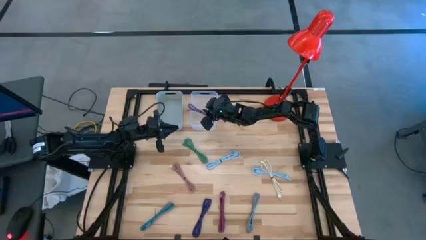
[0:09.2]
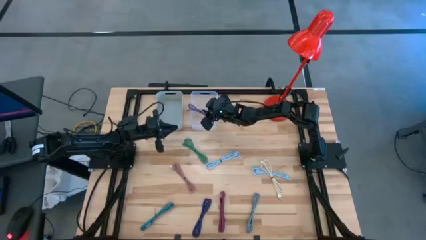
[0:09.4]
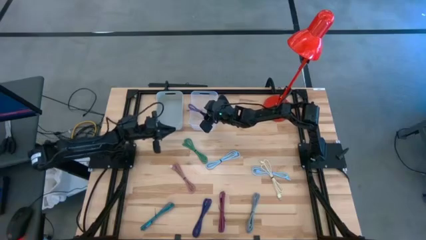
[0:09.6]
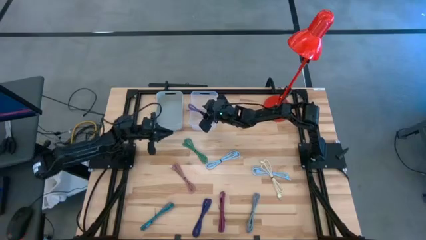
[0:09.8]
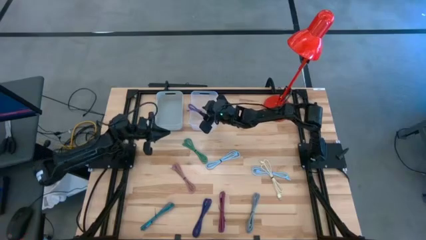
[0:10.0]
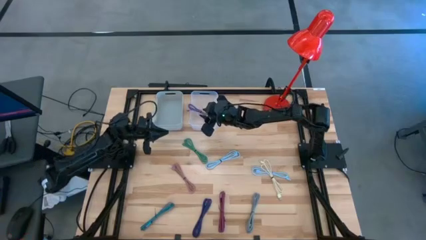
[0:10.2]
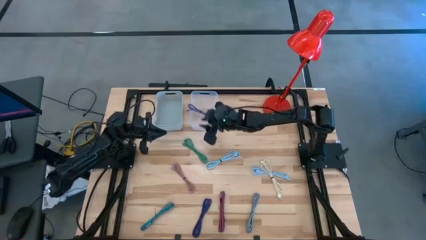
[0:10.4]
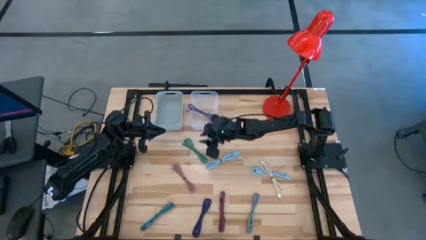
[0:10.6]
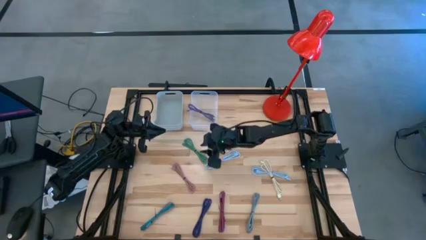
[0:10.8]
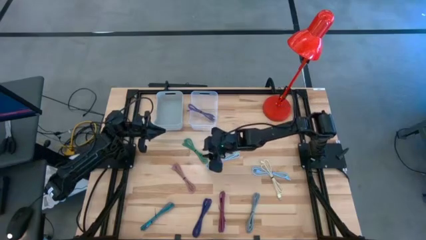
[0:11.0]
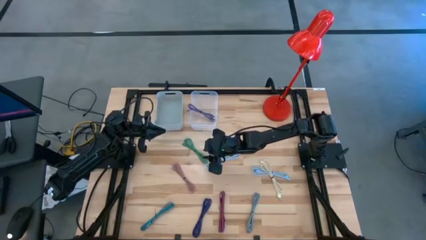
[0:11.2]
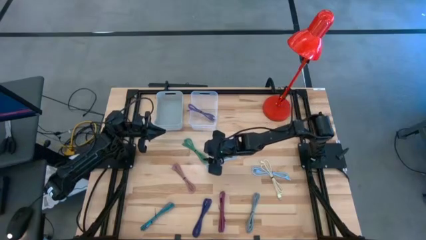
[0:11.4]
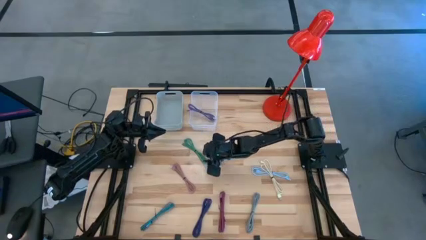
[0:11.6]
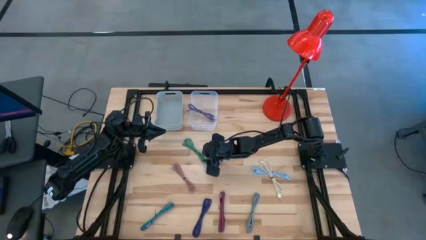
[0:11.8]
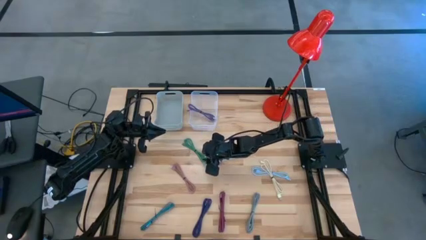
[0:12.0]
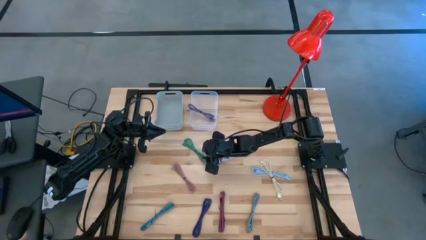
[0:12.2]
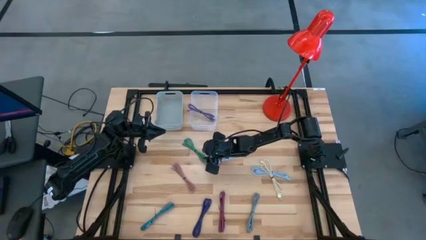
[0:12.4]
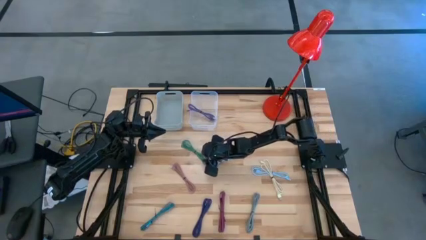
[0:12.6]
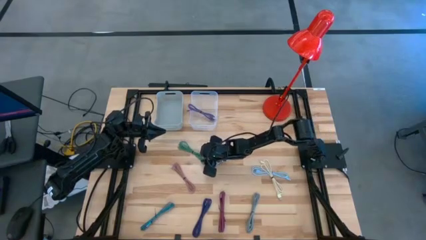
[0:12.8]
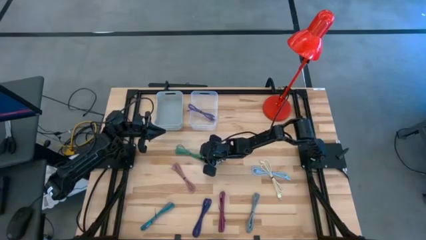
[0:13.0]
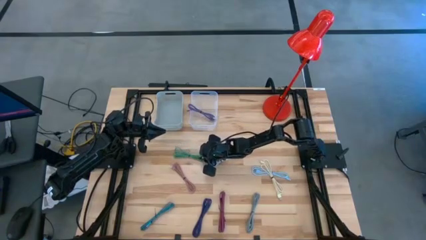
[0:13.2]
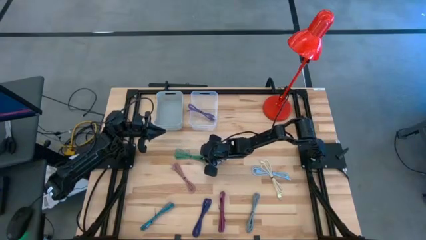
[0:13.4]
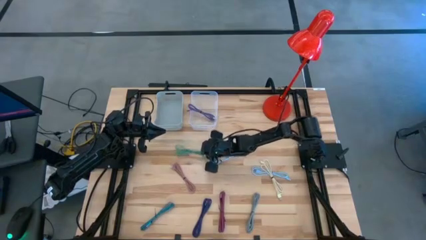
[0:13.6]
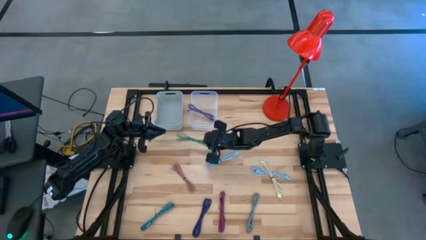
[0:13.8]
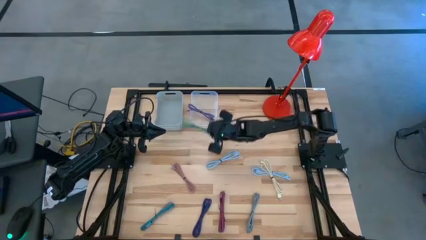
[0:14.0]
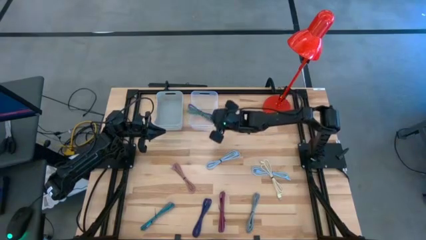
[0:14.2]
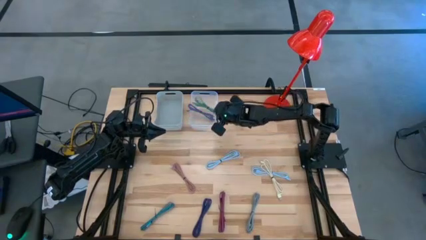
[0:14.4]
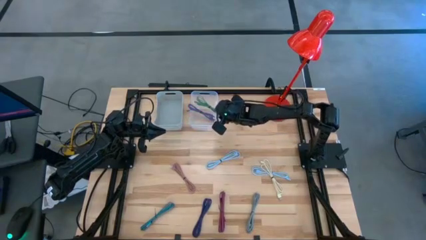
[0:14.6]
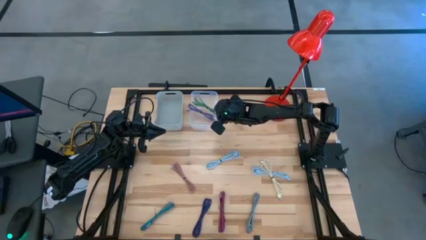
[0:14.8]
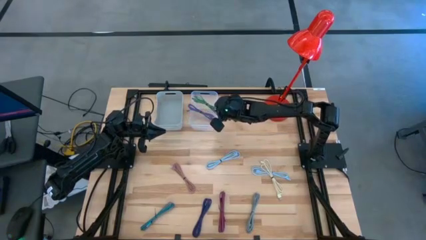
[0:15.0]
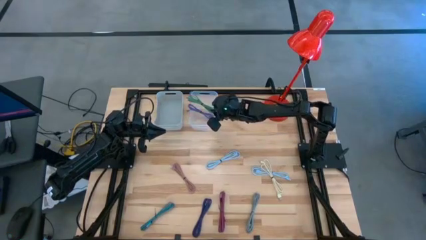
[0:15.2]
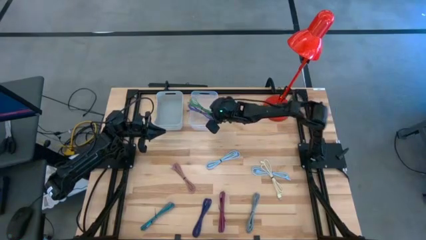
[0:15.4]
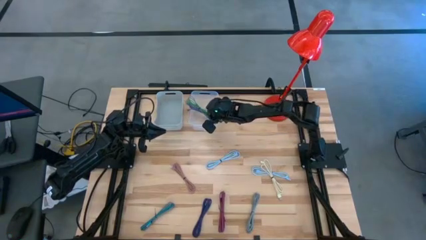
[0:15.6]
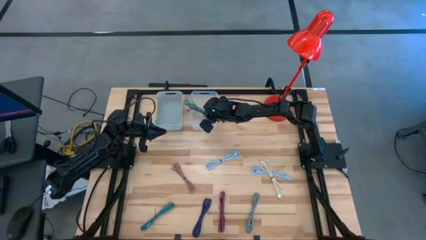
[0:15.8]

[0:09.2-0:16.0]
Task: Pick & Place USB Port
Put the green charge cable into the transparent bin

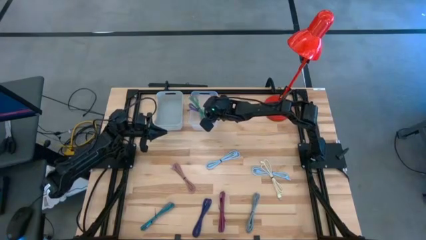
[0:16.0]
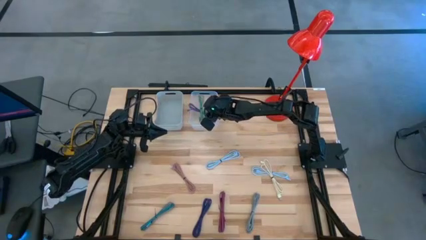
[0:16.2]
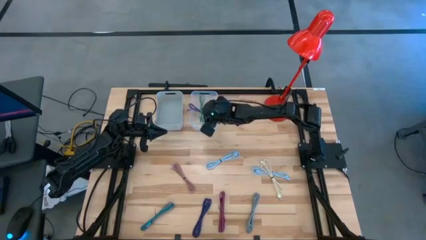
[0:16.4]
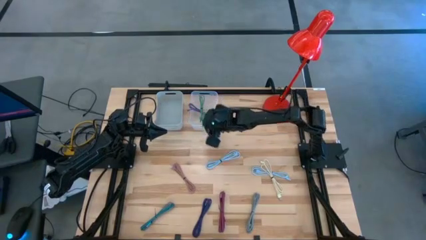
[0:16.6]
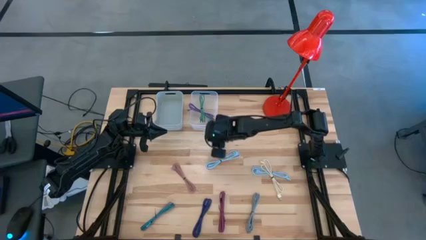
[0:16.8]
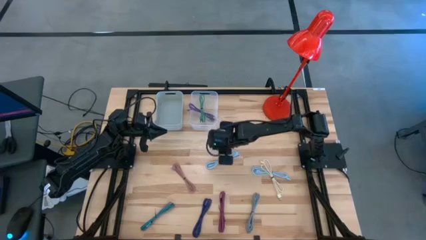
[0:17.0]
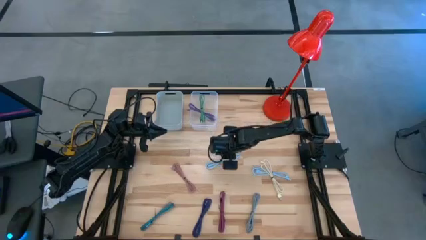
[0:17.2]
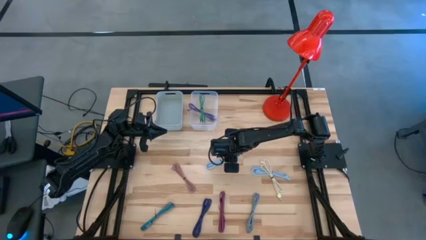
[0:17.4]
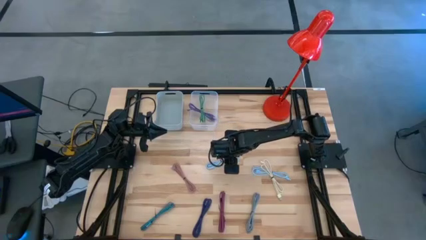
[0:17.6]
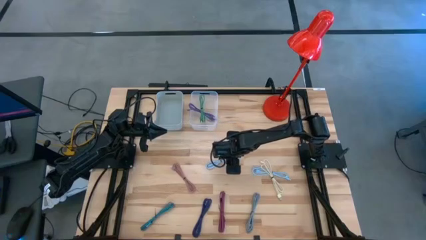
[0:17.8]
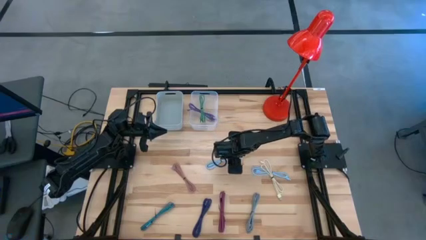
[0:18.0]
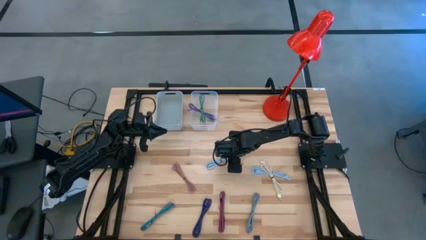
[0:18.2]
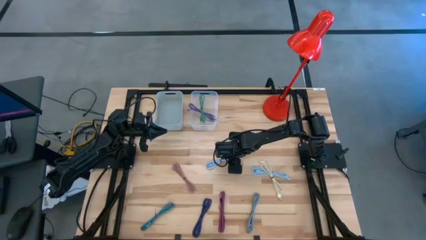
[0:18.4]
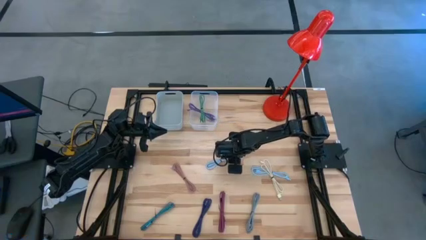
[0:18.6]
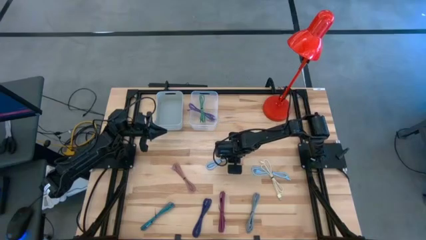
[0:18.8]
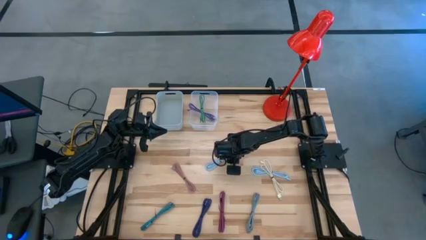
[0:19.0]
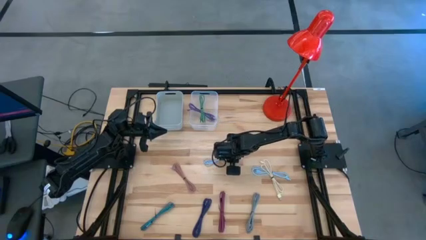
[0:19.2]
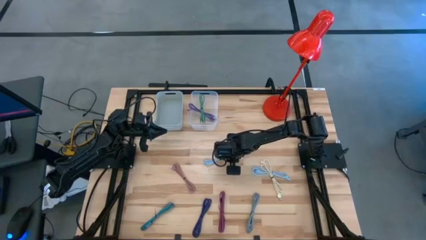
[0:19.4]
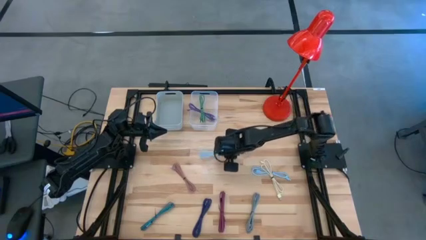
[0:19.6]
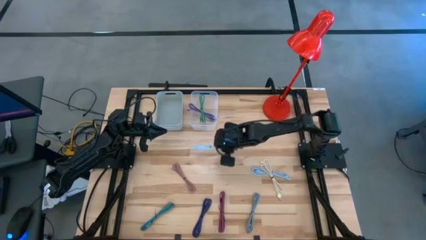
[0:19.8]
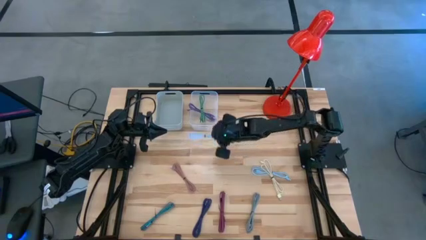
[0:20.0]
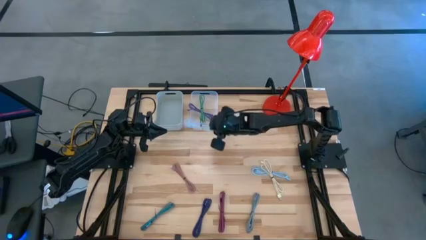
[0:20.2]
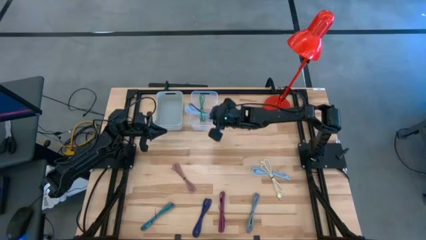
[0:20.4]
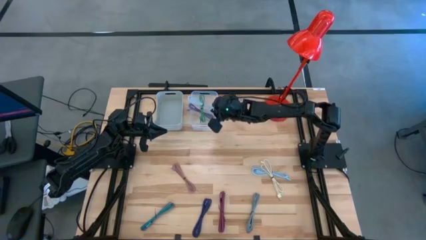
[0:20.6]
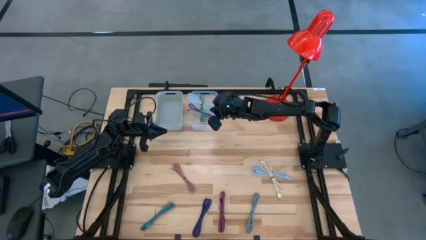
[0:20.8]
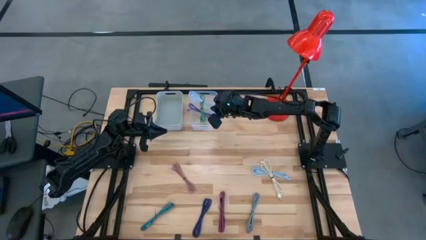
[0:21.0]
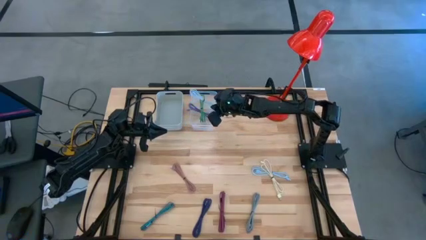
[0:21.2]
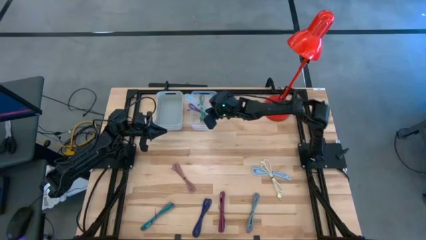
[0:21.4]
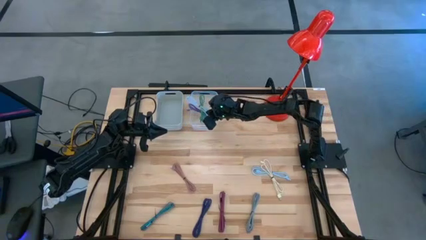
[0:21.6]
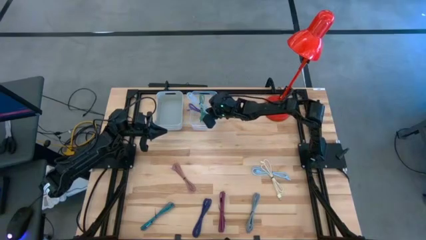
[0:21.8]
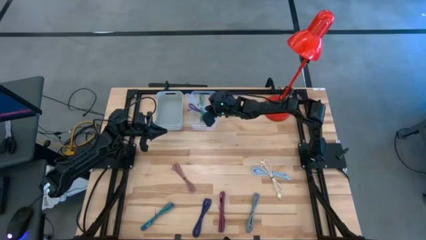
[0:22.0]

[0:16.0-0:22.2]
Put the light blue charge cable into the transparent bin

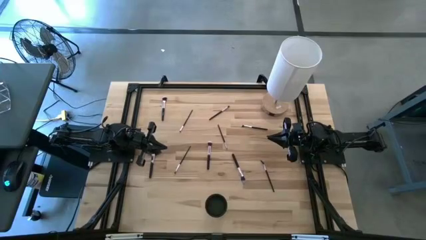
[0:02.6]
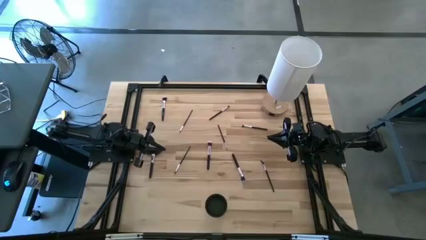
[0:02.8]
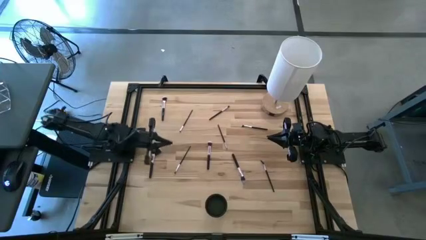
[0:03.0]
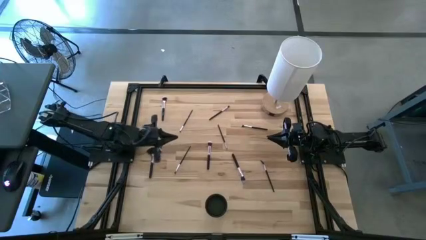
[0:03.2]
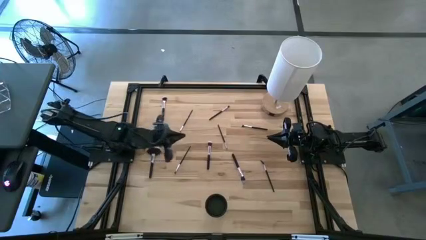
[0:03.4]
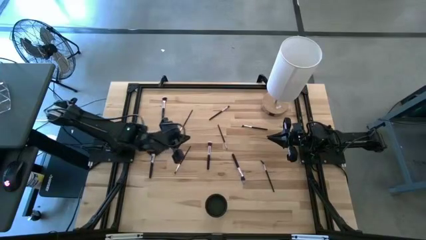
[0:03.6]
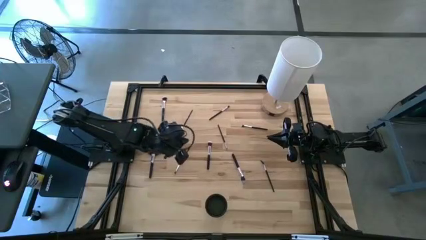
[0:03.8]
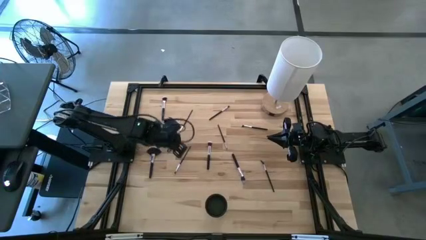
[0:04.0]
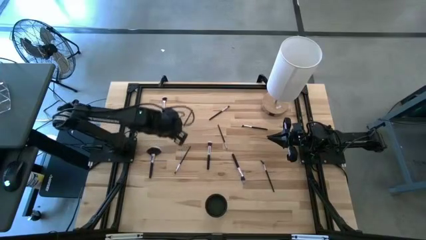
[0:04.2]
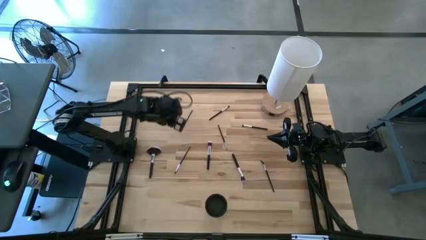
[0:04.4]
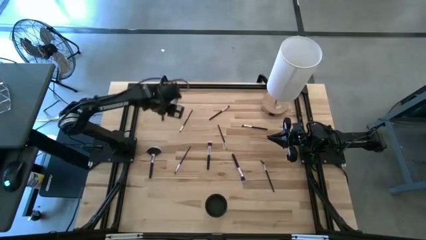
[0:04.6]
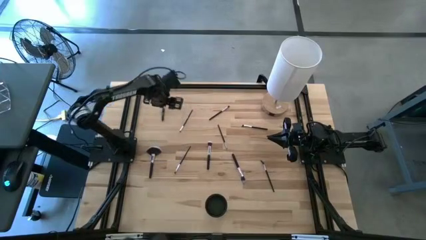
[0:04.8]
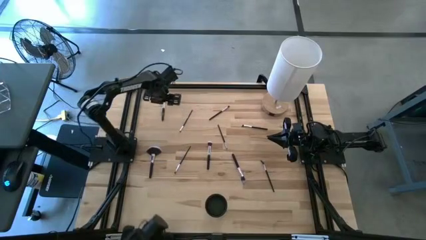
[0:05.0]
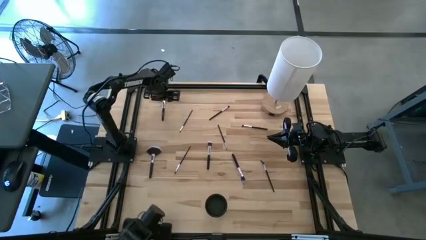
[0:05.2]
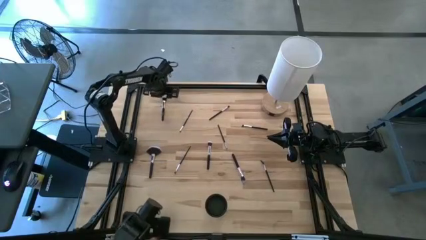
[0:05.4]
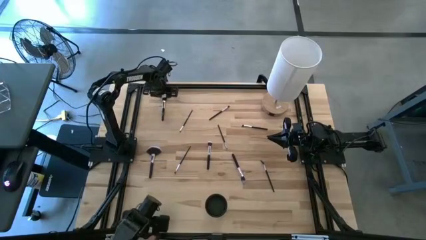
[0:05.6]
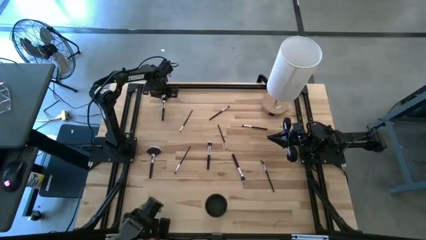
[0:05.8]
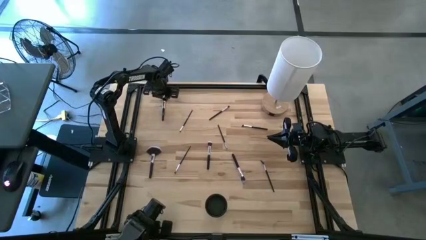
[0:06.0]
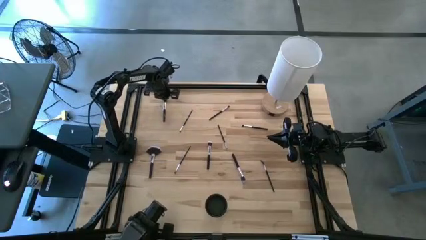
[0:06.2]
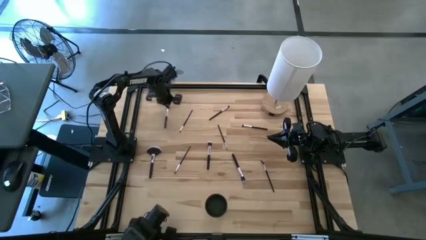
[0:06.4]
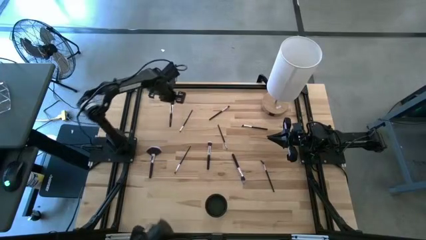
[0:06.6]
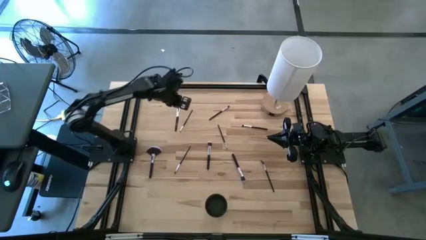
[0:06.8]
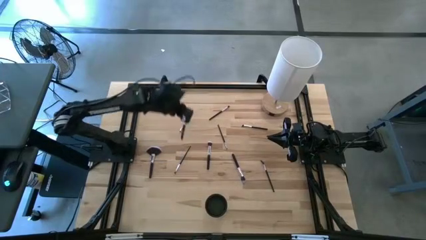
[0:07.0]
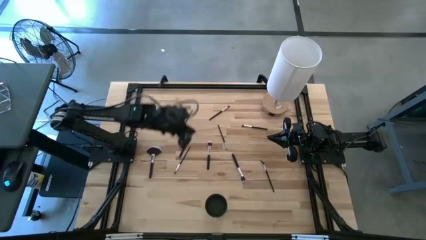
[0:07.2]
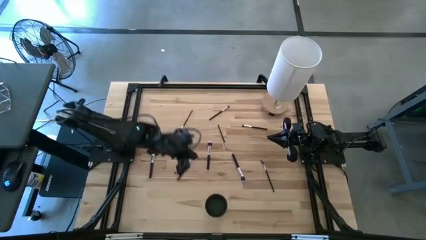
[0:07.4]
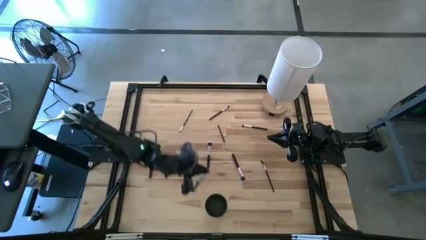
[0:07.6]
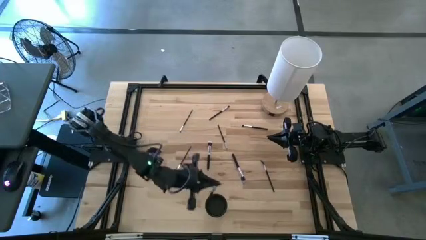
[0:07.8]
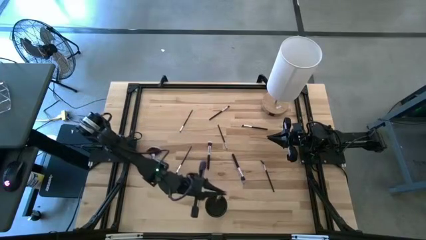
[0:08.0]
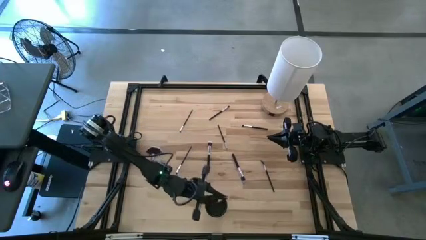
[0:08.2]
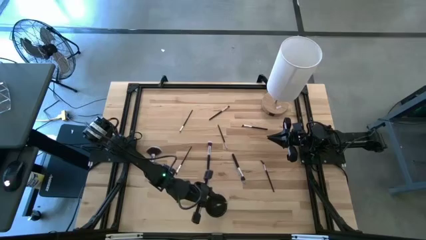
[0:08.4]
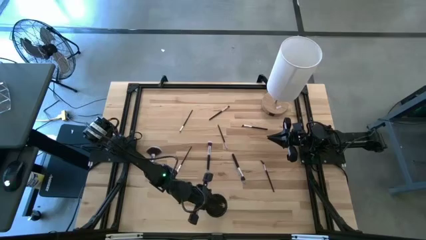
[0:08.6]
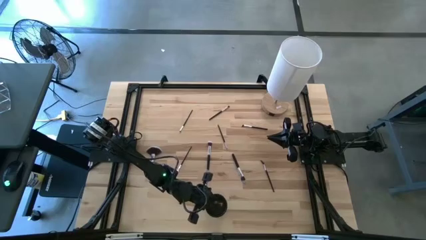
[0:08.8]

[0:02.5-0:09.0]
Task: Put items in baskets/containers
Put the top black powder brush into the black pen holder
